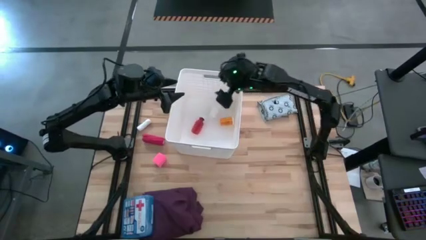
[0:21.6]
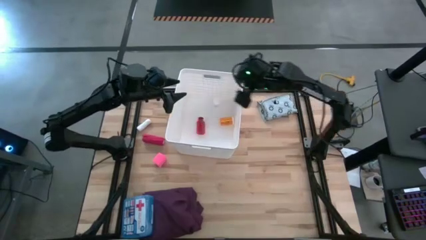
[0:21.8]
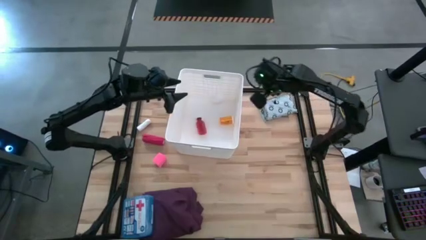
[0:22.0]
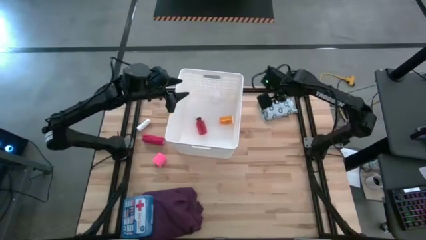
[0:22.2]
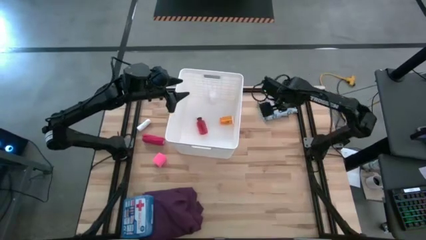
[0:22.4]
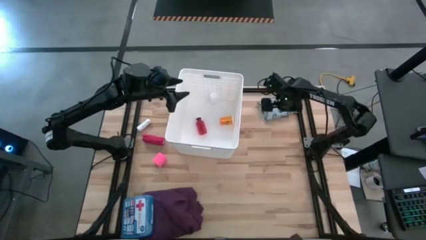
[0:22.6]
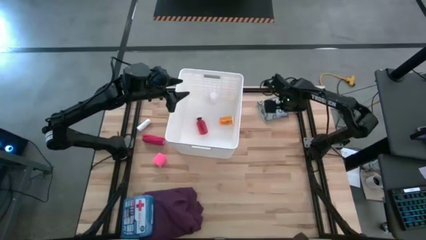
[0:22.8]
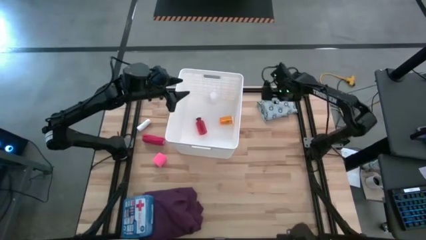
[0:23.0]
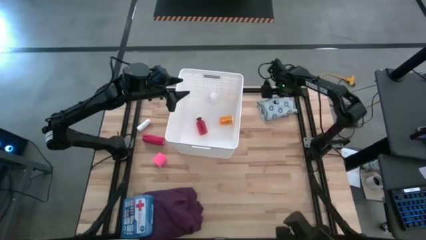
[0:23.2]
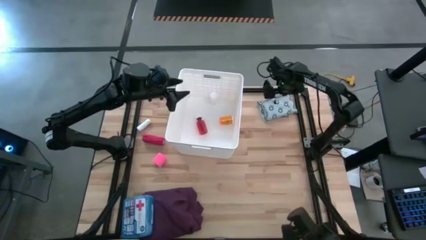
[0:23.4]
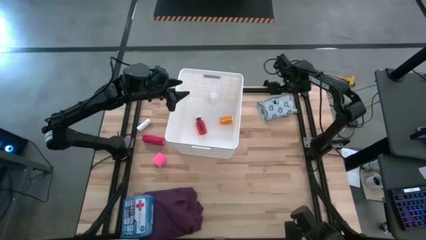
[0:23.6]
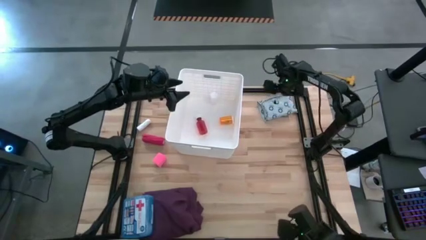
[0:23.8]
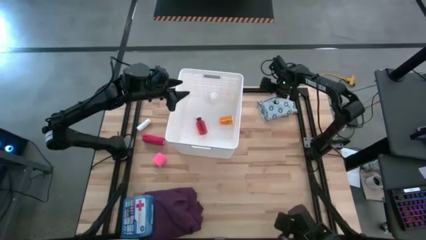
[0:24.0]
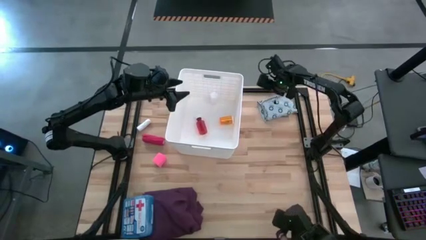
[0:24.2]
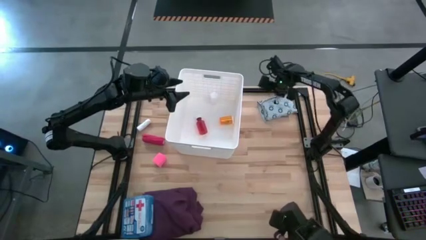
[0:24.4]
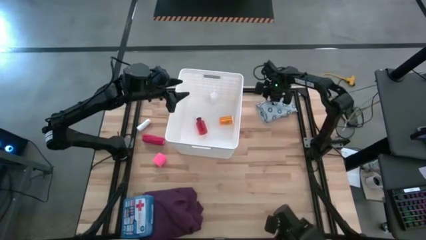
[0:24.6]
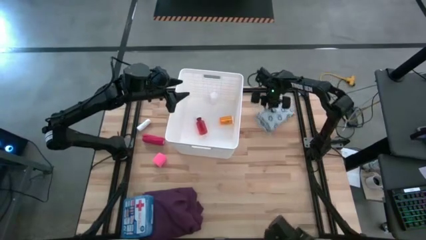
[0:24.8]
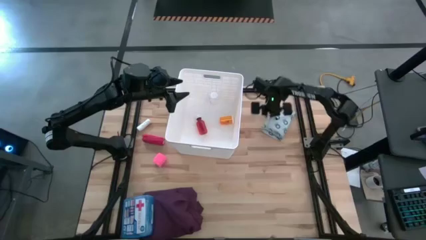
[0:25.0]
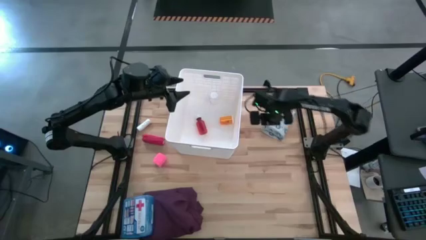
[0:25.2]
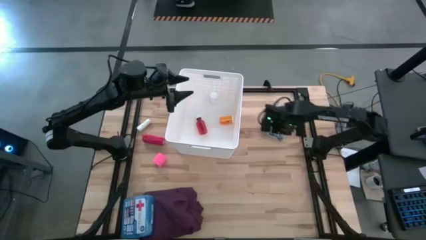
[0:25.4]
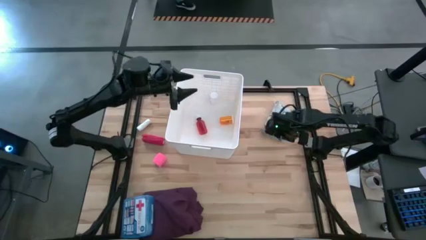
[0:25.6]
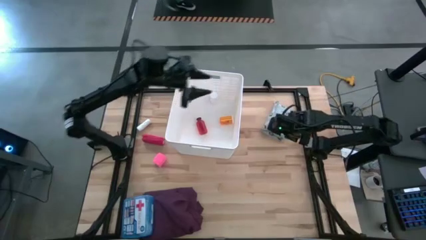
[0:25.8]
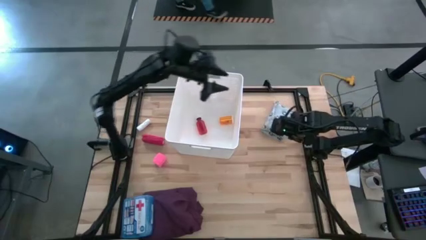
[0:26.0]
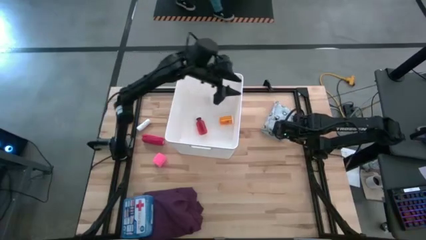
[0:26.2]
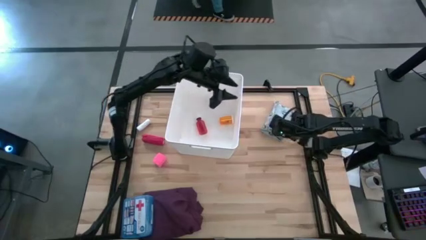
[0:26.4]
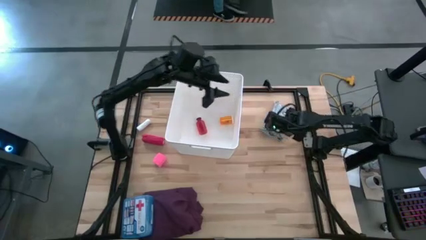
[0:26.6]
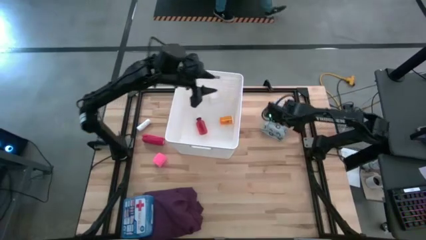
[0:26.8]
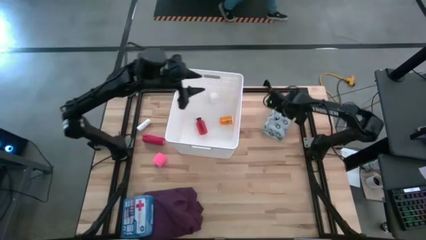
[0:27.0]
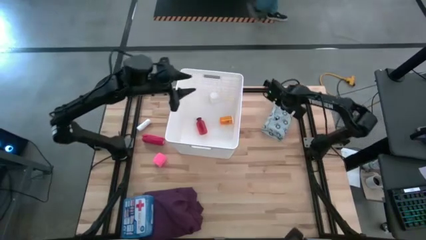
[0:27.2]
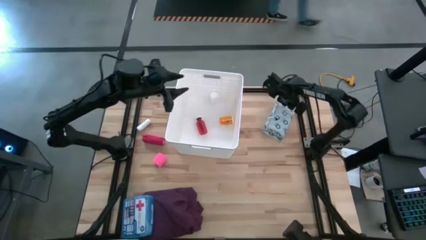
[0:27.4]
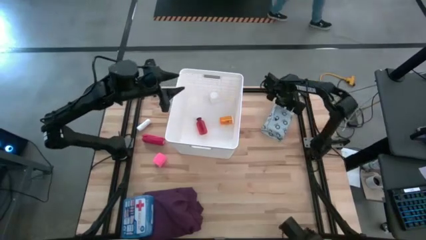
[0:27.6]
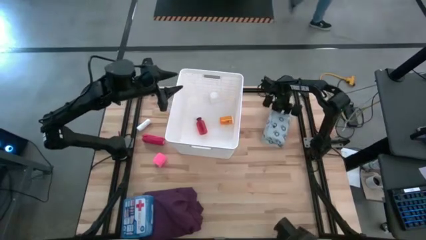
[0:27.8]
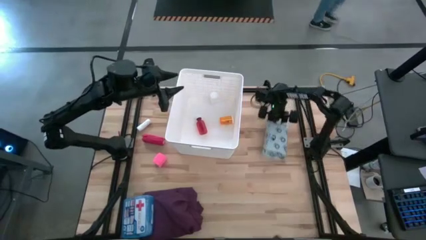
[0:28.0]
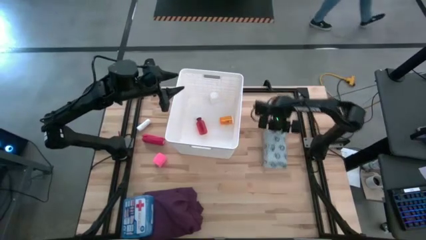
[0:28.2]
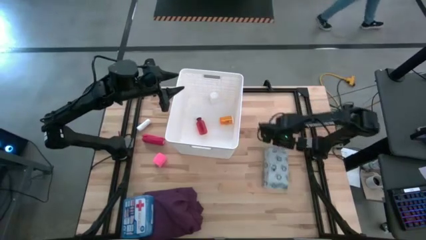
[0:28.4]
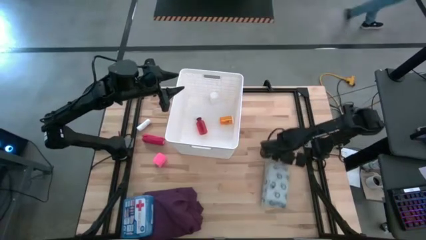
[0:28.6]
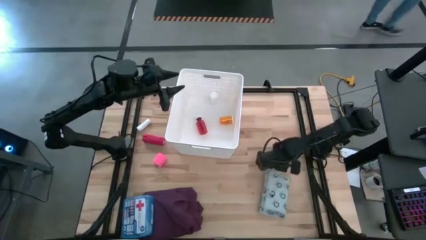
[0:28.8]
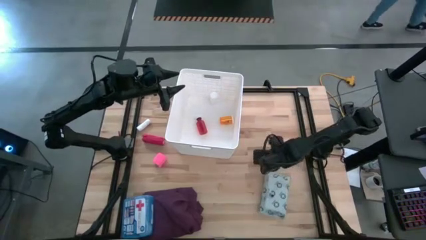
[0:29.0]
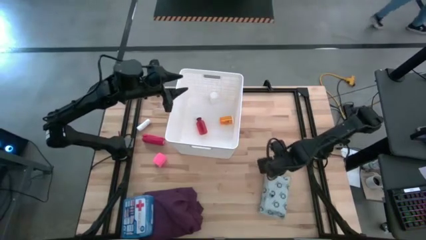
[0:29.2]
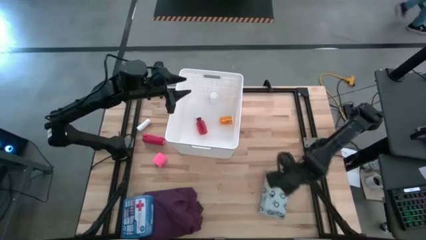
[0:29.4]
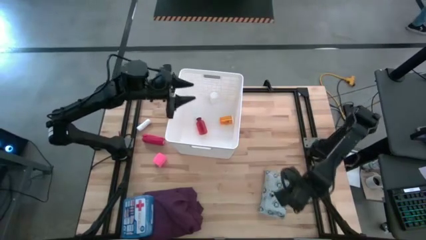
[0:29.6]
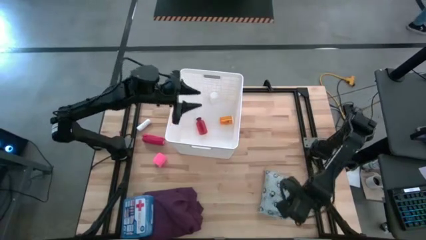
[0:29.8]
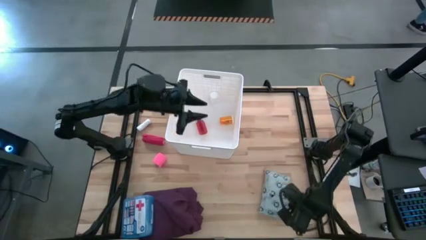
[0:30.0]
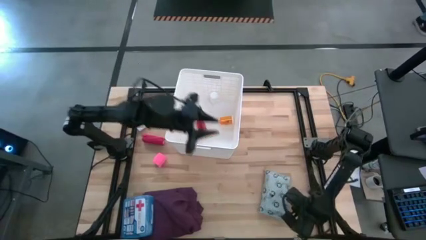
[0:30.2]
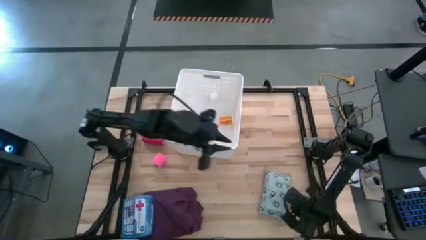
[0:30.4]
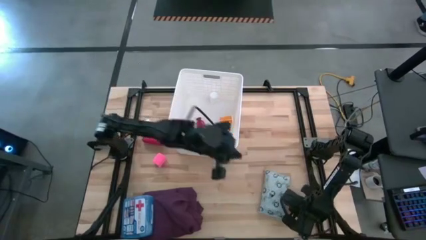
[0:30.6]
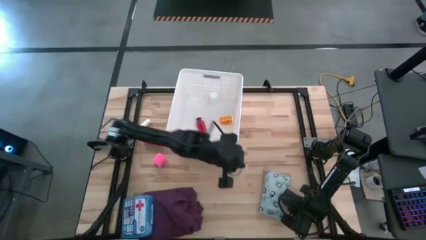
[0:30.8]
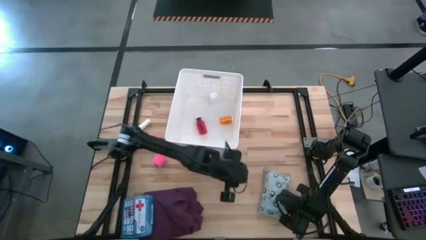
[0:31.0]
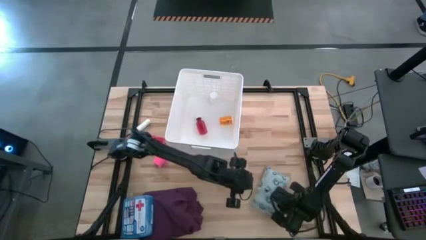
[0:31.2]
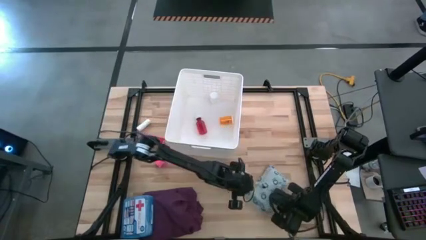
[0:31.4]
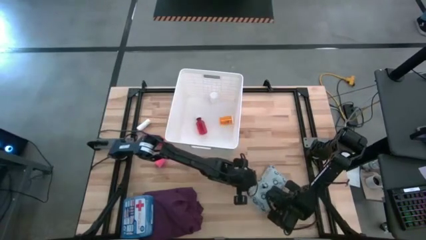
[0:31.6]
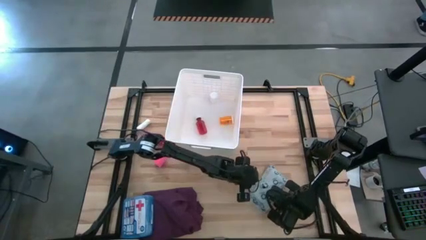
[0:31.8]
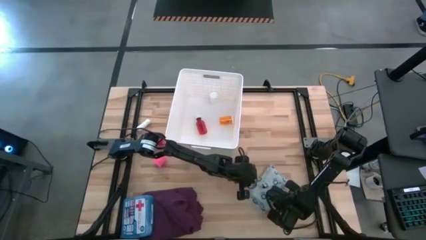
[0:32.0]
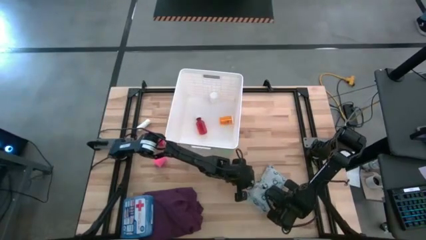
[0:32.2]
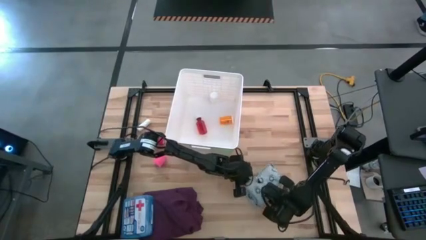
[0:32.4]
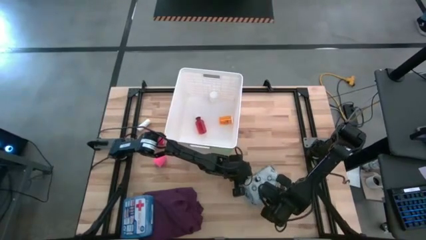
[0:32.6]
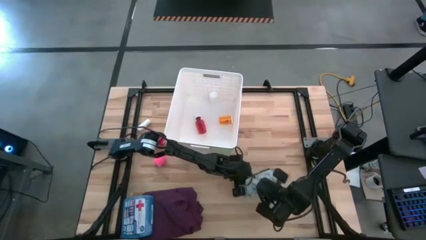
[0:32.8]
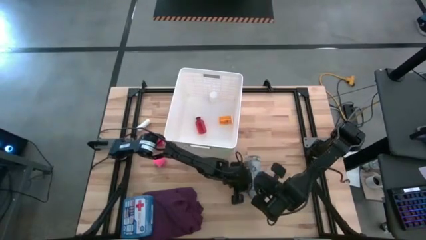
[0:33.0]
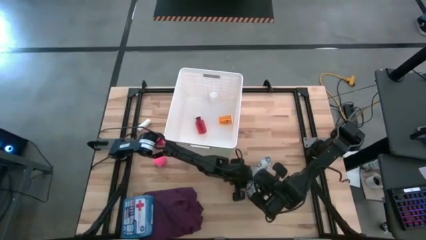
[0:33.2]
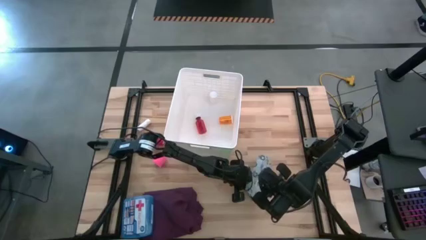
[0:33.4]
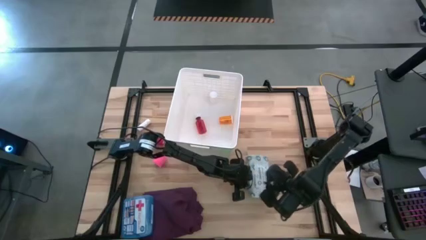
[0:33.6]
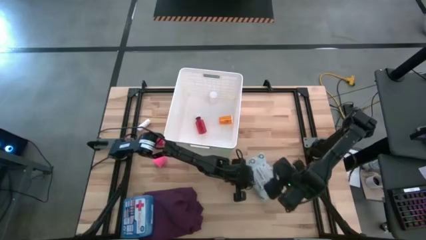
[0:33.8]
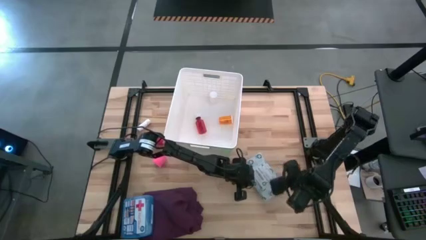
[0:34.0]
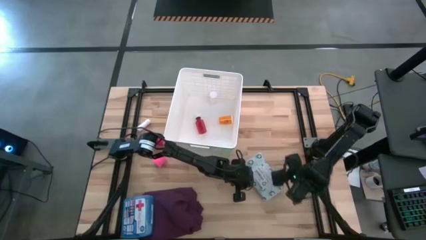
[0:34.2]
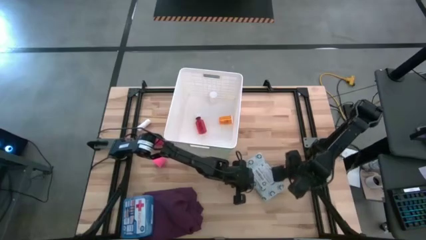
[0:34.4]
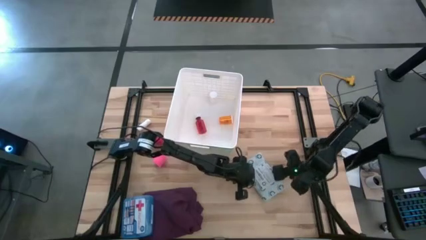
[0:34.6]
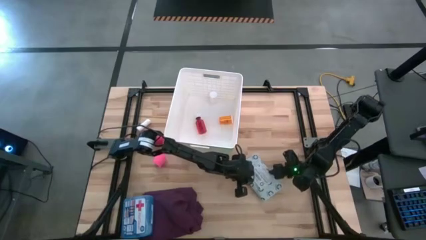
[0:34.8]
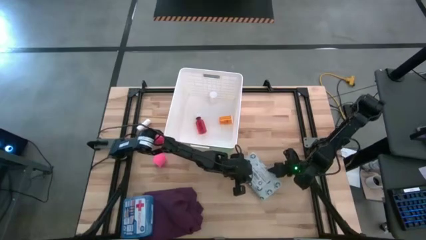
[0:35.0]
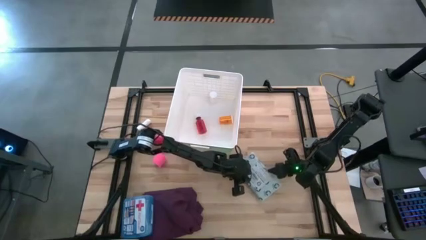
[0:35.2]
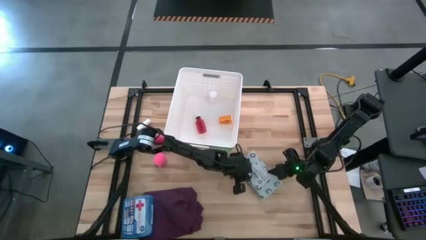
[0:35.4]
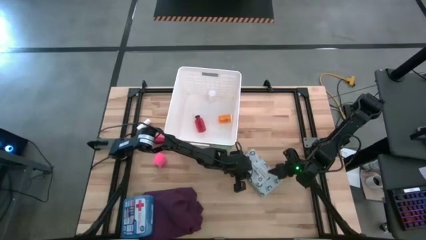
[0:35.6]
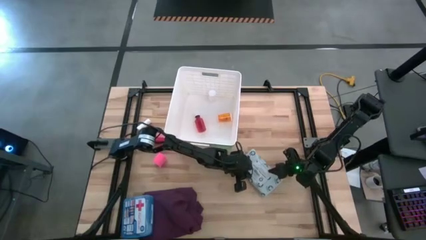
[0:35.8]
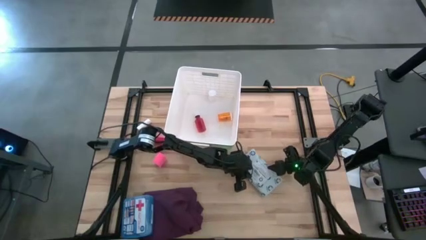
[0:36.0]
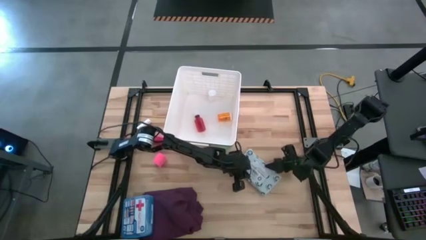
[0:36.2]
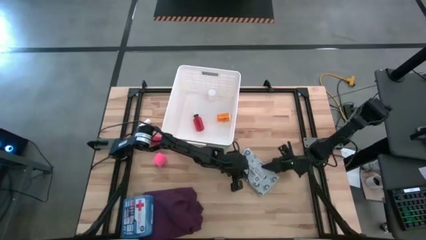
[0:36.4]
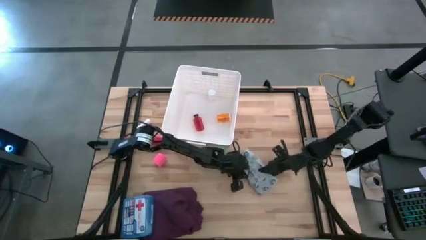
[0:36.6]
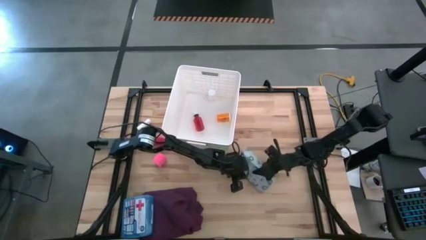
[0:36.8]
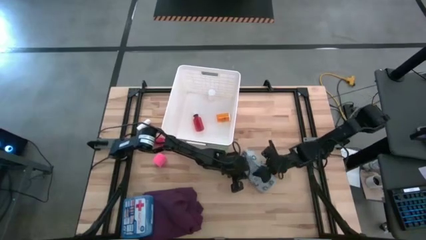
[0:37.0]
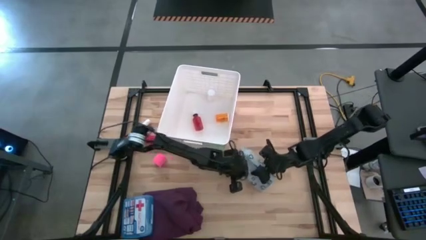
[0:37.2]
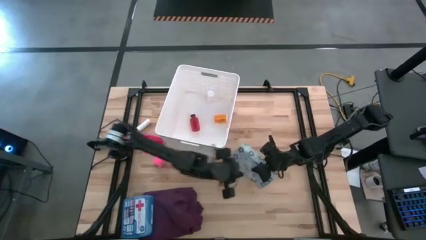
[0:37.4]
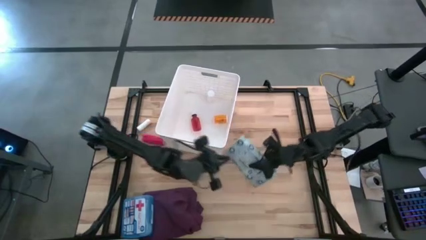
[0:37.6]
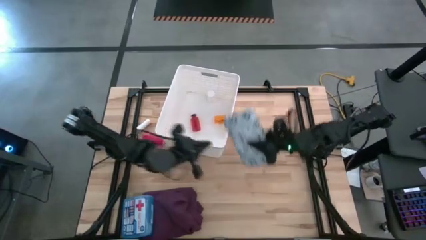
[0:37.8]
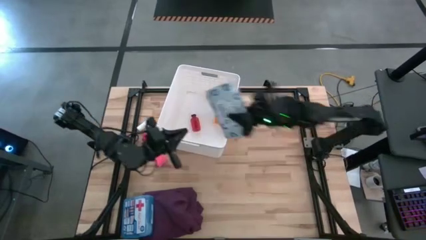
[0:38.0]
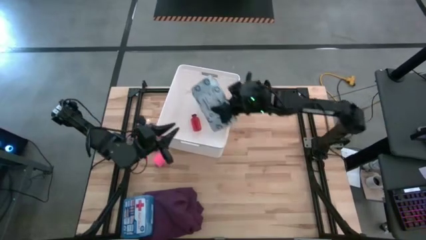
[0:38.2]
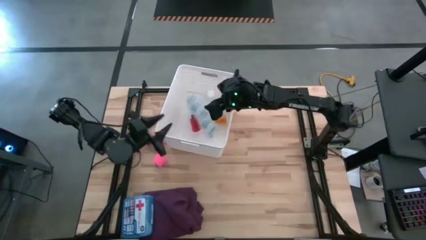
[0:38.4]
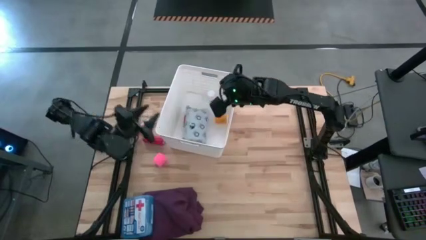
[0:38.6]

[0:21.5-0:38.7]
Task: Pick & place medical supplies in basket/bin
Put the mailer bag into the white bin

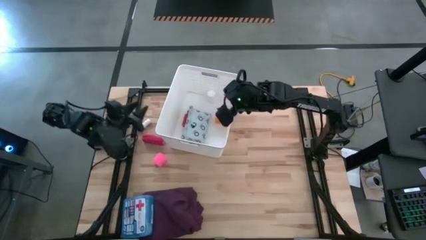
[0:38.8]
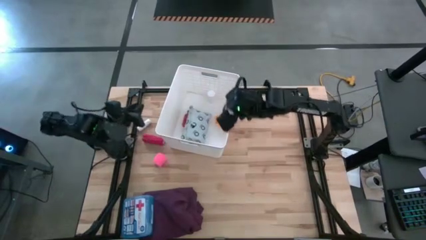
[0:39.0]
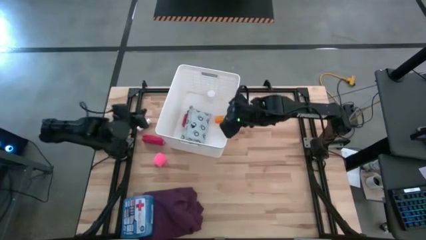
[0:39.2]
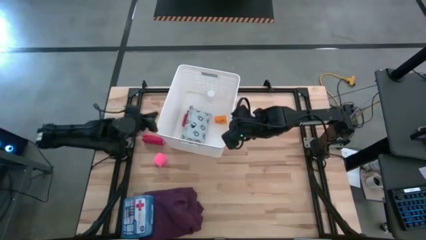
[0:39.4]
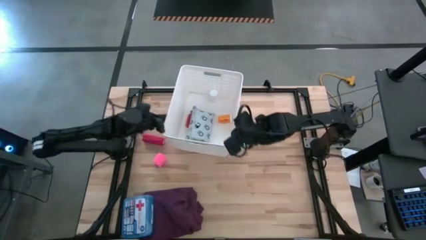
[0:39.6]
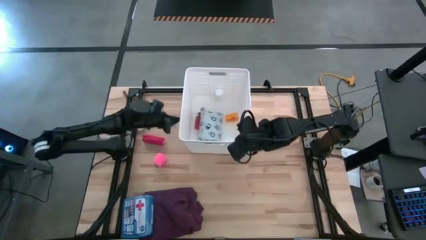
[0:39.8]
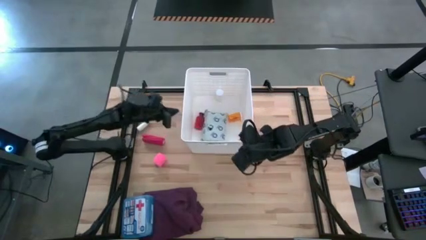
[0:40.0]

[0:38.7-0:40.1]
Adjust the white bin
